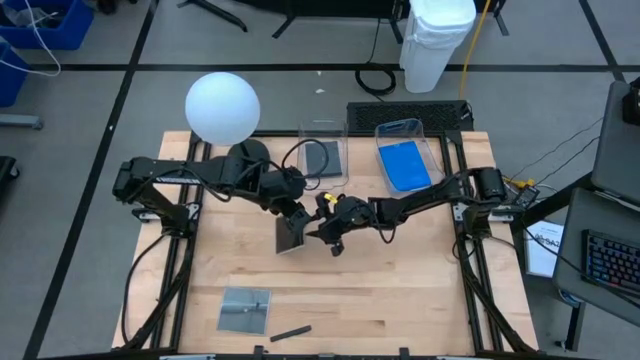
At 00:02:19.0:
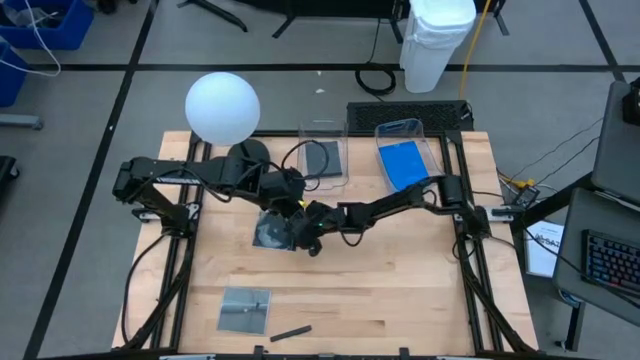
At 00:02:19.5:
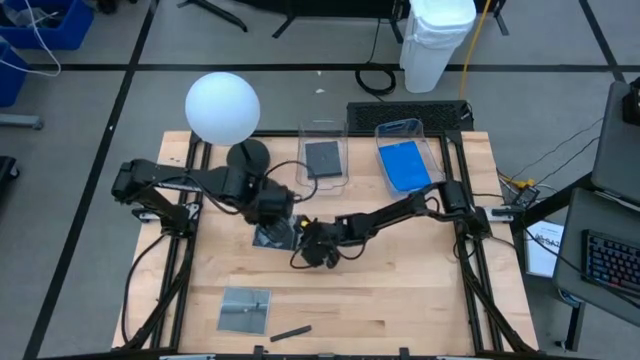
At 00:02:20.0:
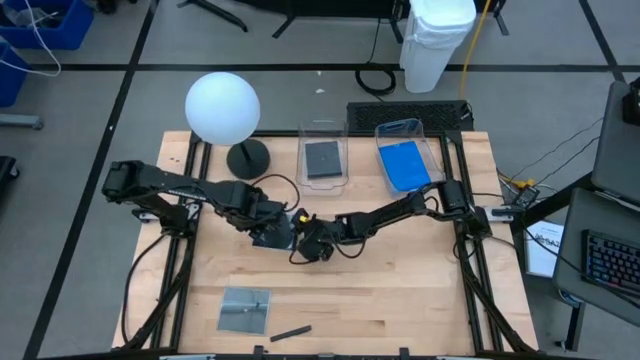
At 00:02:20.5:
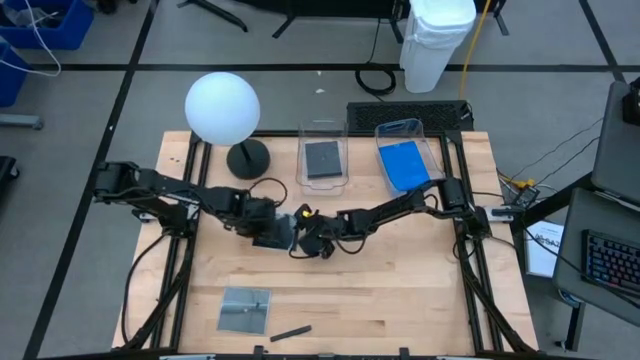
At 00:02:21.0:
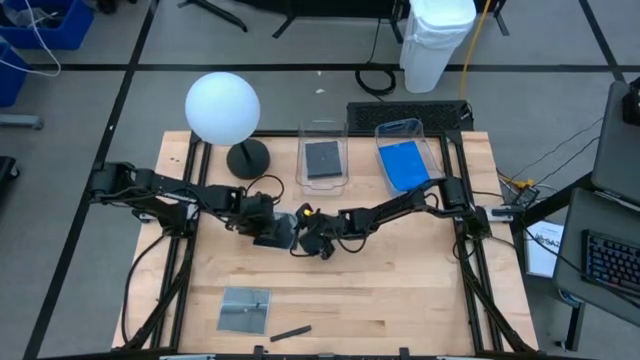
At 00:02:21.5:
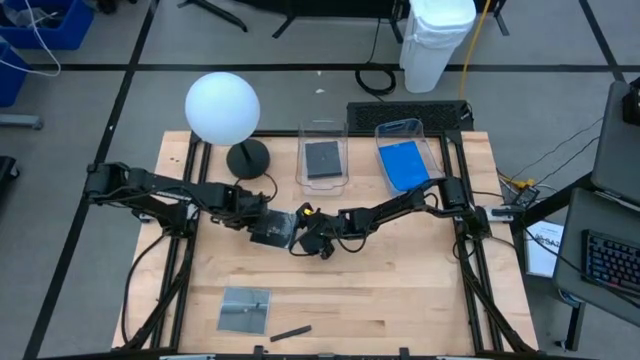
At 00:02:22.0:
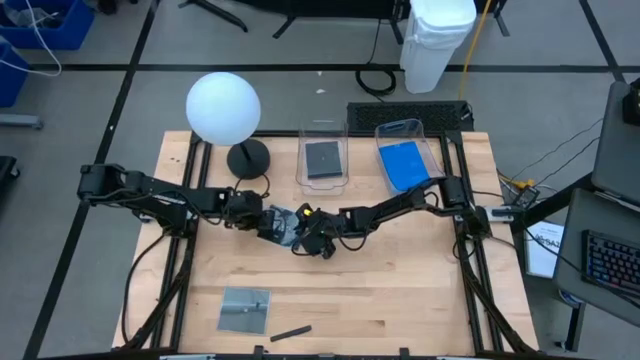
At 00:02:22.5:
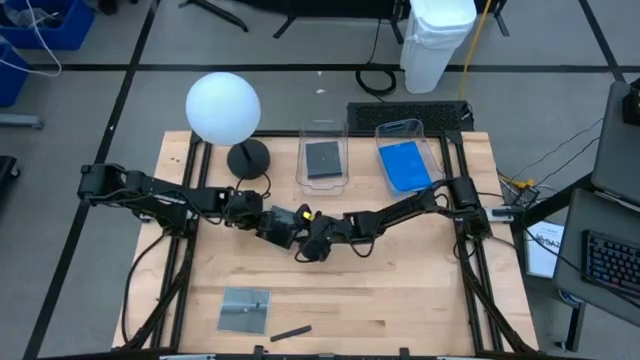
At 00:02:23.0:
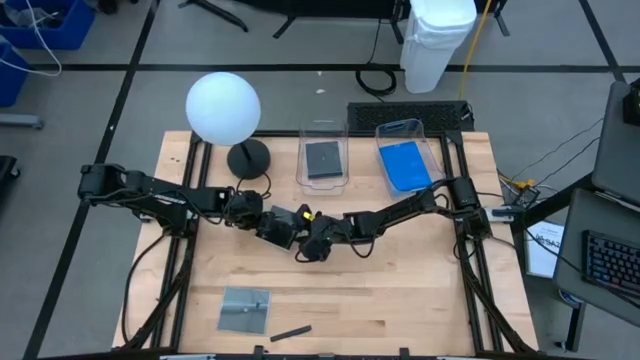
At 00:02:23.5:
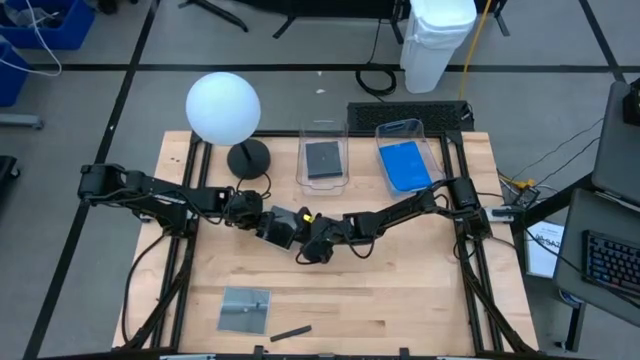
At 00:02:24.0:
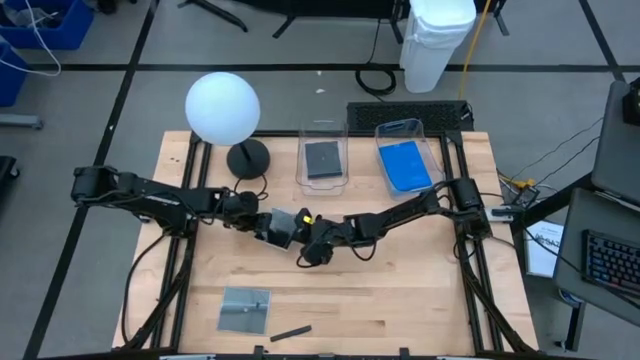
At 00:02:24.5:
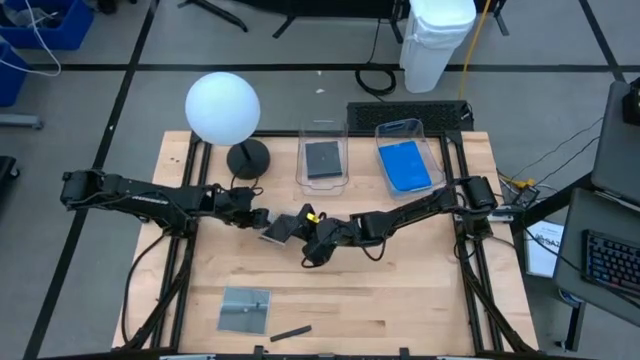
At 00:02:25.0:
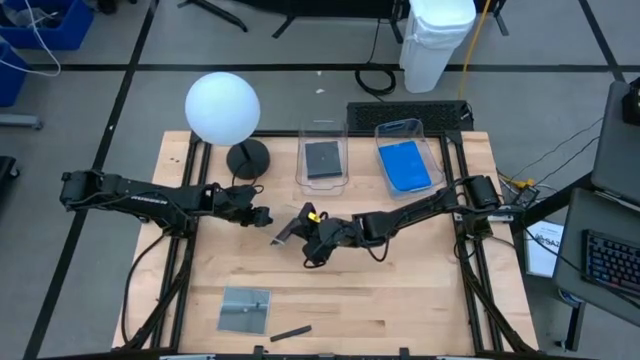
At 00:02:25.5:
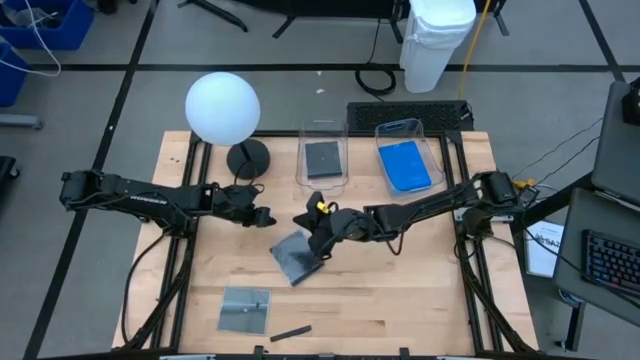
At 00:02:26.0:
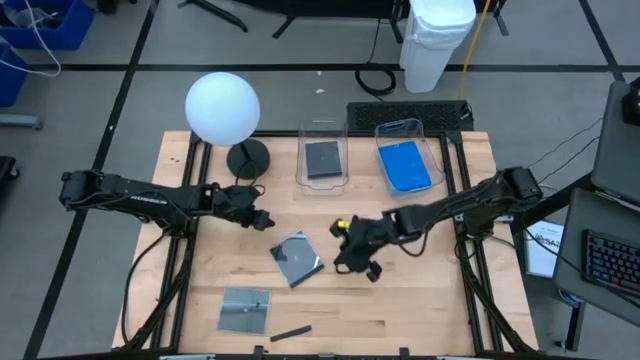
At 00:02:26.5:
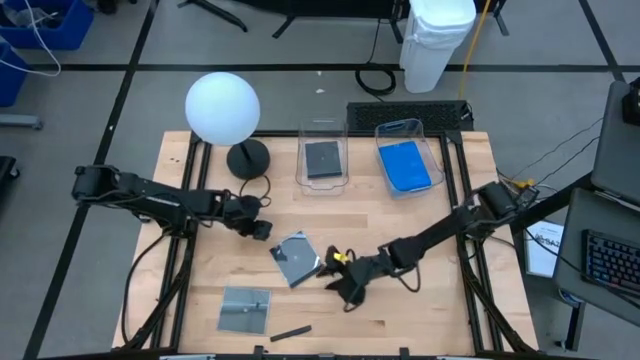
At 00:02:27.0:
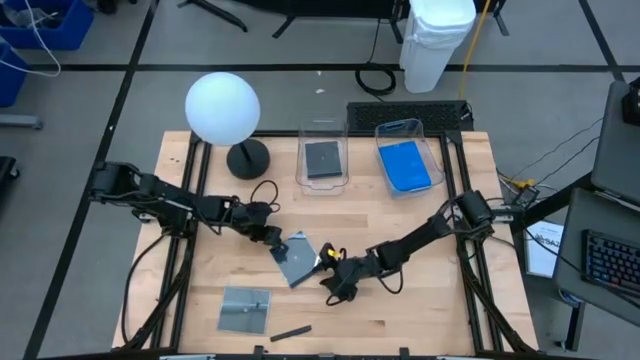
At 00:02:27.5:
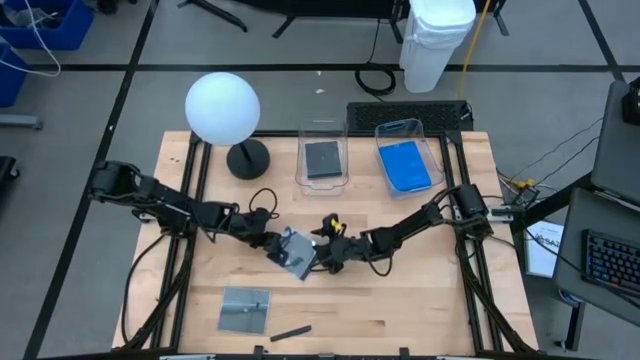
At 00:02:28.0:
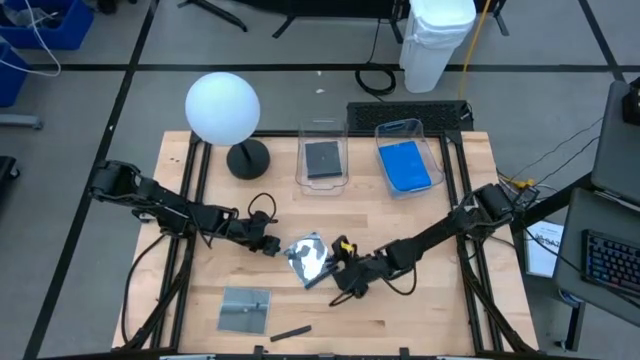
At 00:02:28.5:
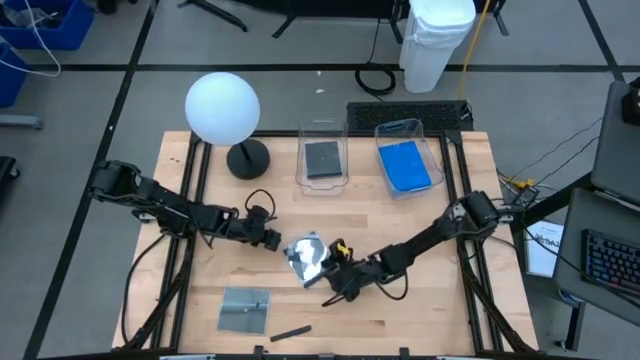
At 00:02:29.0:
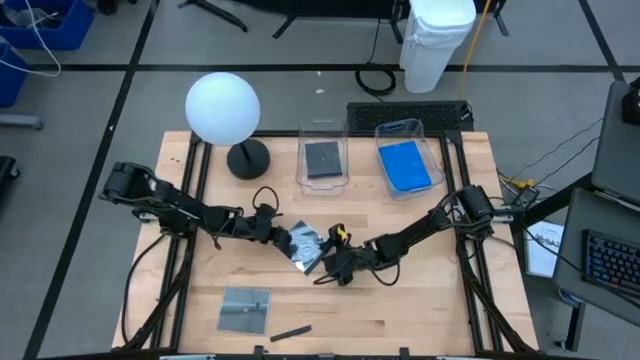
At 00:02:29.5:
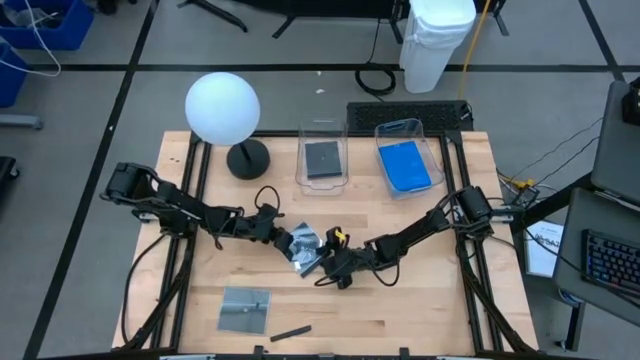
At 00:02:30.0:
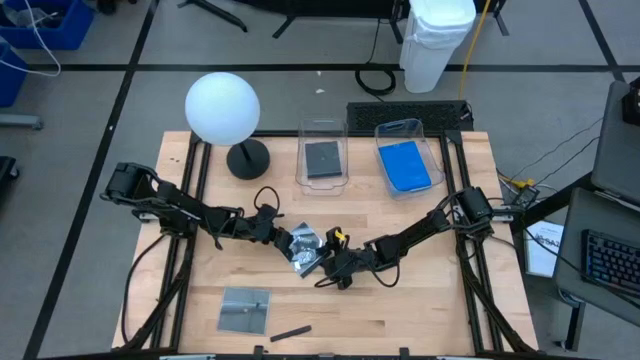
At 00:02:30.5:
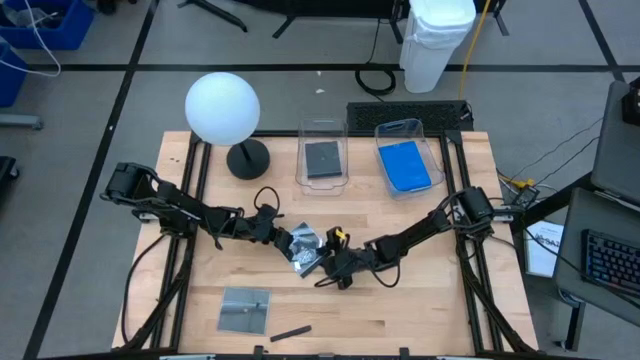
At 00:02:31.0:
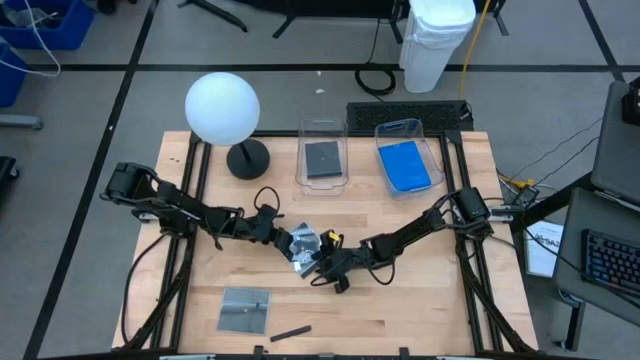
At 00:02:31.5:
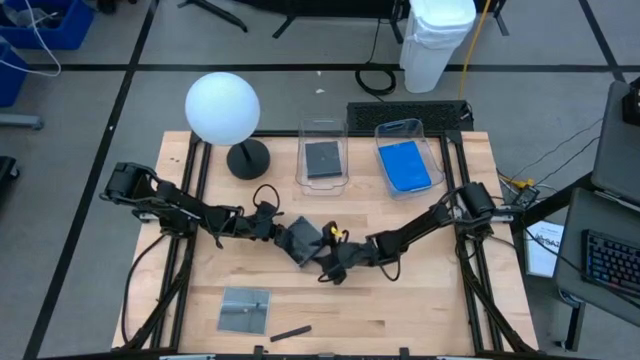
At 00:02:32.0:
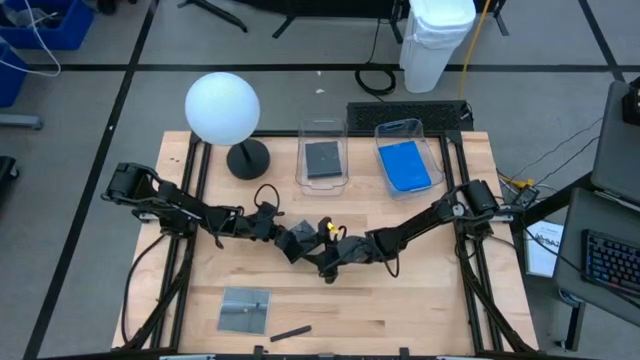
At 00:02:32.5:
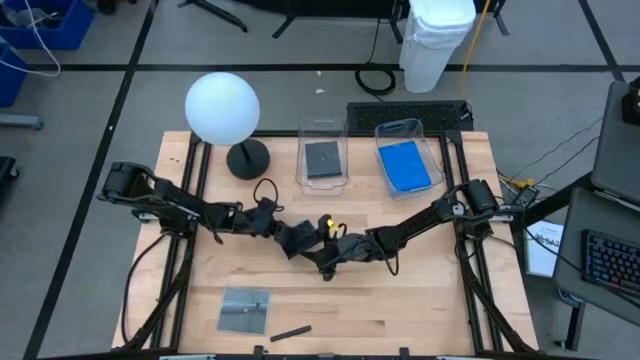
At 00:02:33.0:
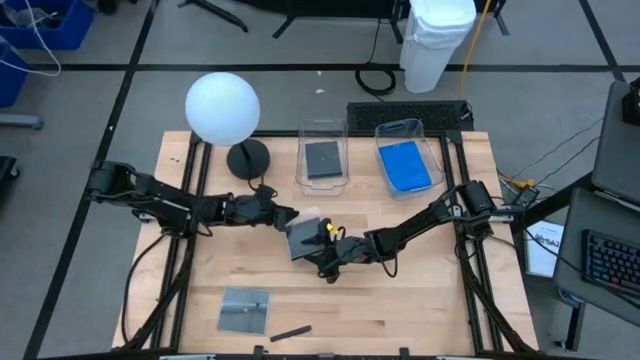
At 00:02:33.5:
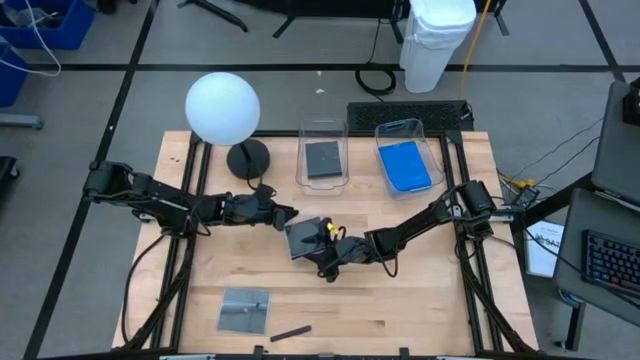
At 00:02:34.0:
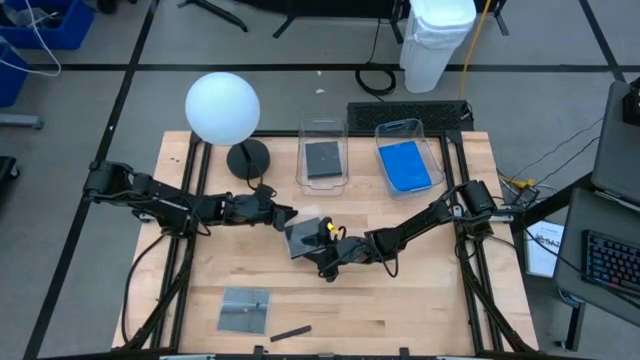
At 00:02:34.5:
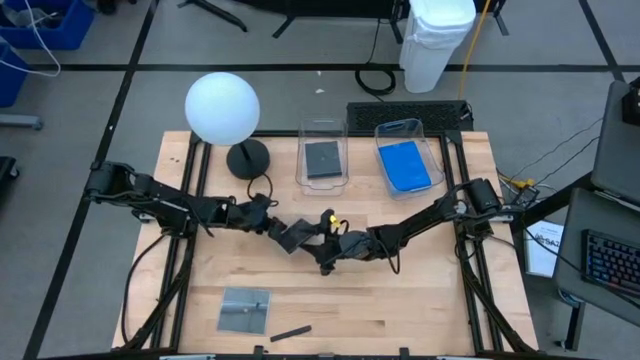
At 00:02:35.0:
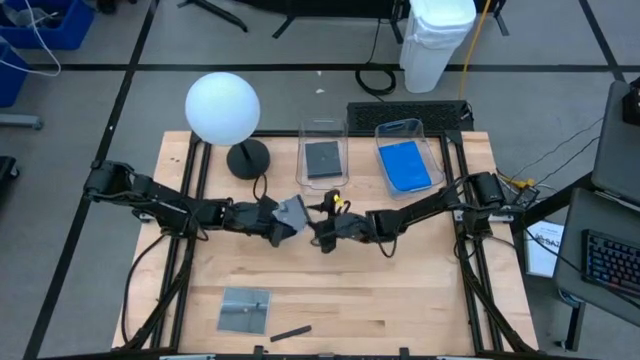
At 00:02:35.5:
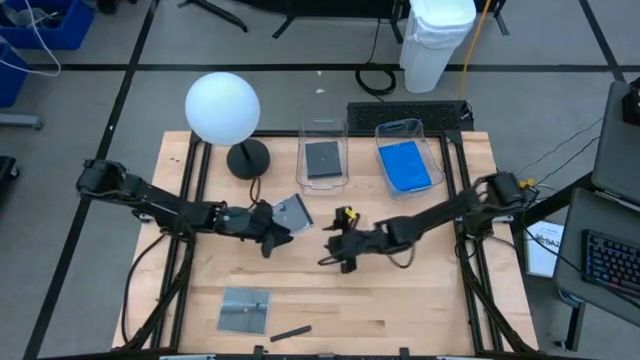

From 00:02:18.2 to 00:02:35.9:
Task: Pick & place jewel cases by type
Put the top black CD case into the left transparent bin

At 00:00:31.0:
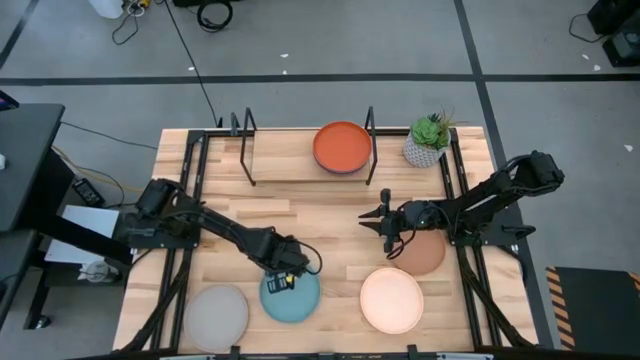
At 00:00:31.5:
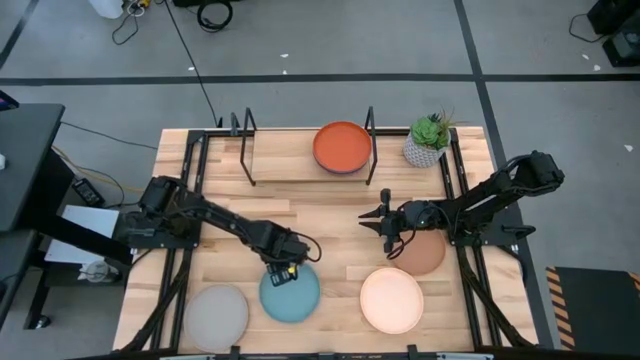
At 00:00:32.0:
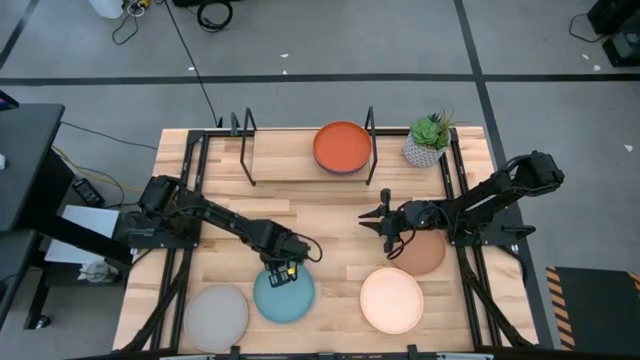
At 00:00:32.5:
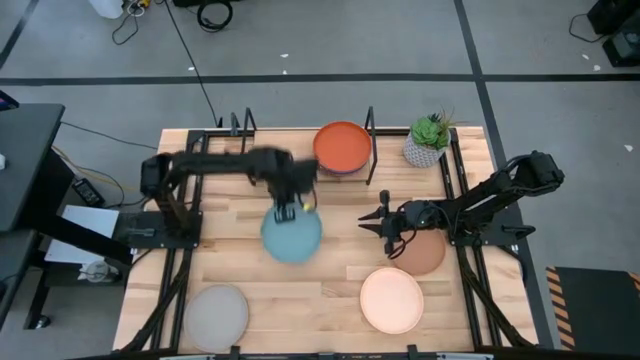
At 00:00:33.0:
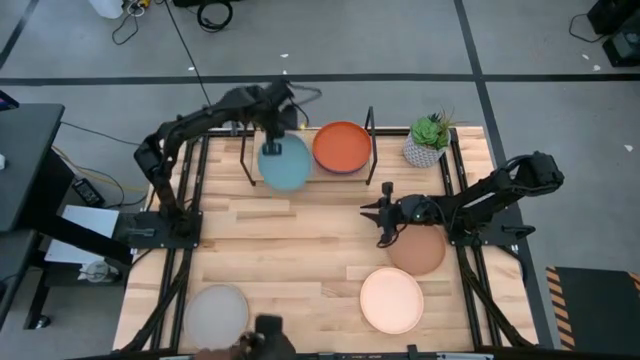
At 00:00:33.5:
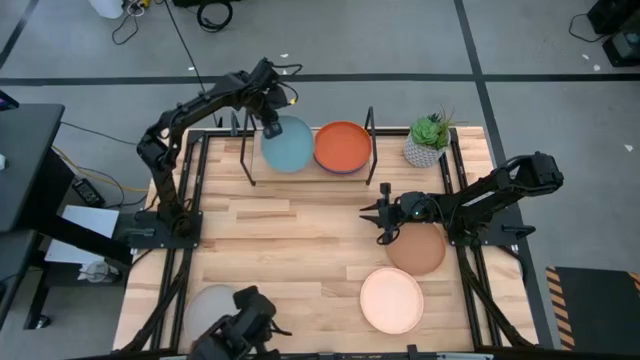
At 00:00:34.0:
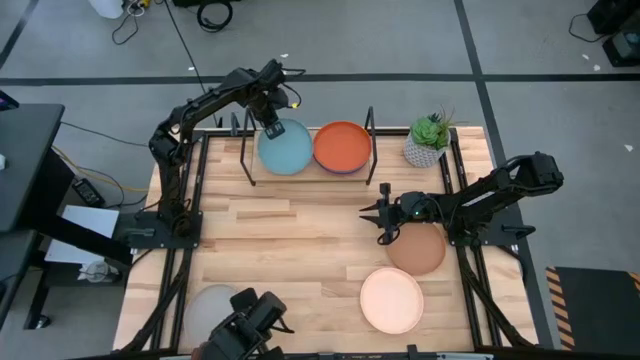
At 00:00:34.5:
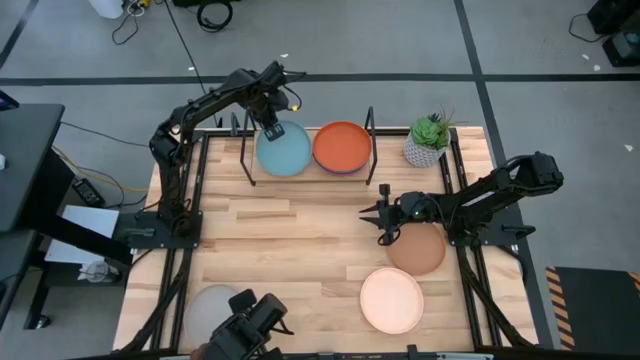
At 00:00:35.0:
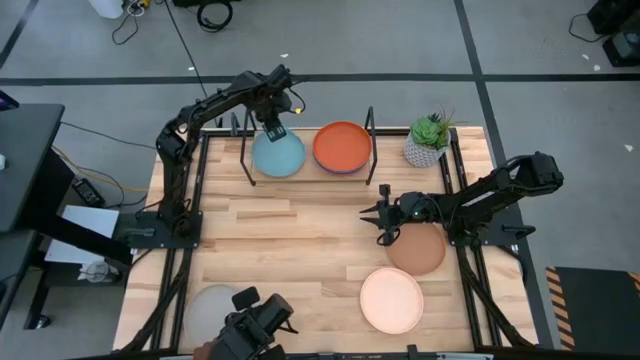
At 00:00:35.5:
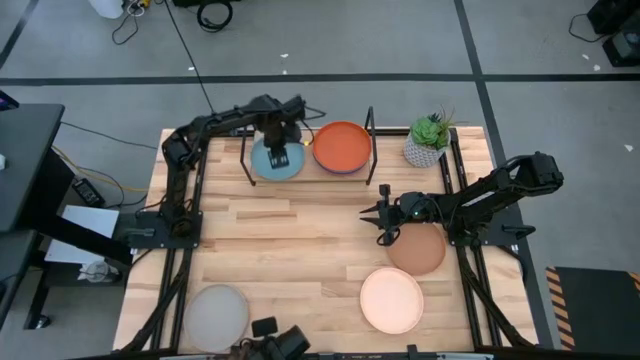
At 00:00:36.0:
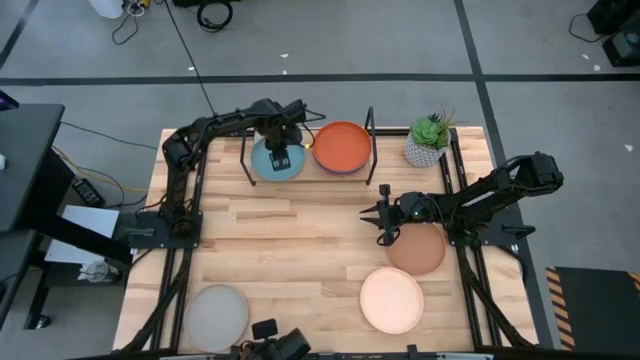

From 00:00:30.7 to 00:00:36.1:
Task: Place and stack plates onto a shelf
Put the light blue plate on the shelf
